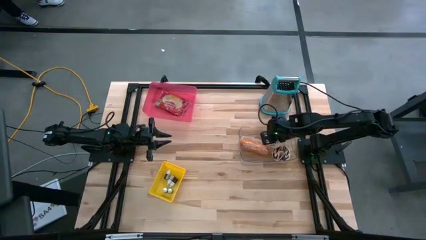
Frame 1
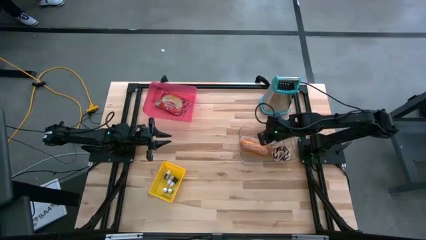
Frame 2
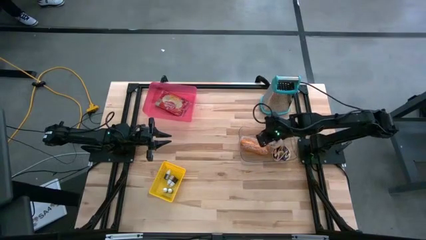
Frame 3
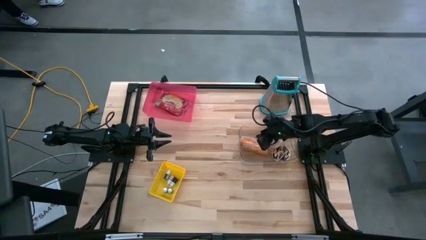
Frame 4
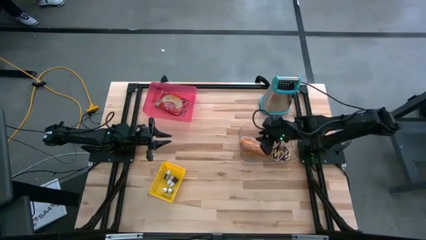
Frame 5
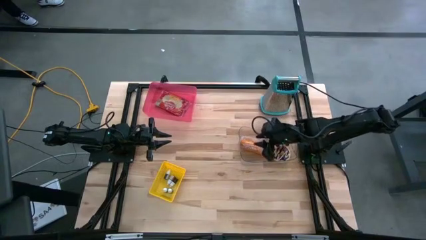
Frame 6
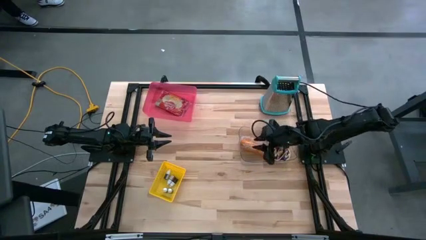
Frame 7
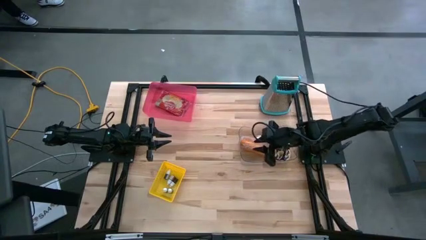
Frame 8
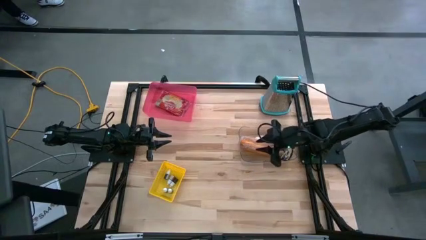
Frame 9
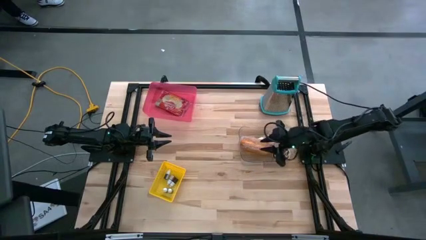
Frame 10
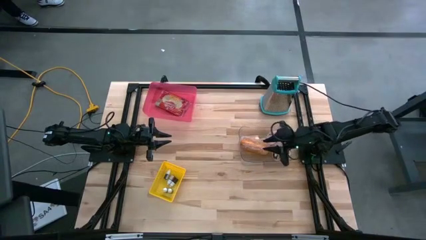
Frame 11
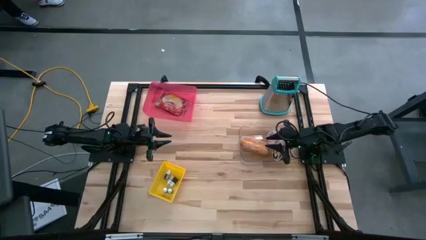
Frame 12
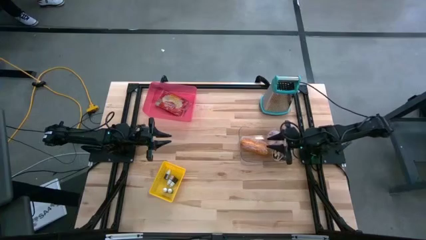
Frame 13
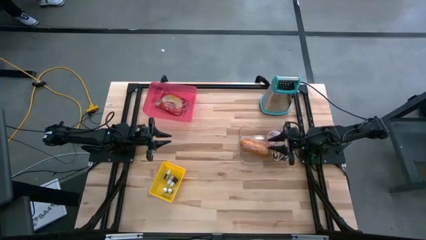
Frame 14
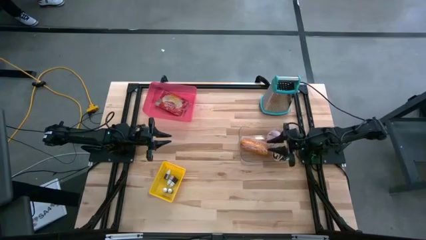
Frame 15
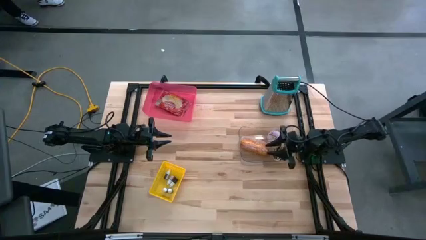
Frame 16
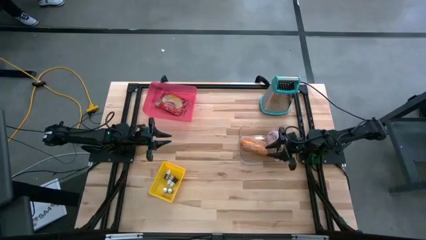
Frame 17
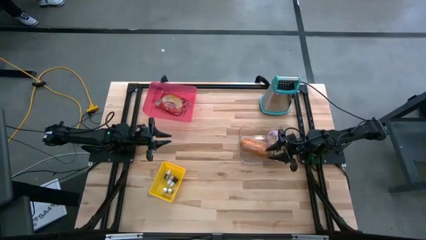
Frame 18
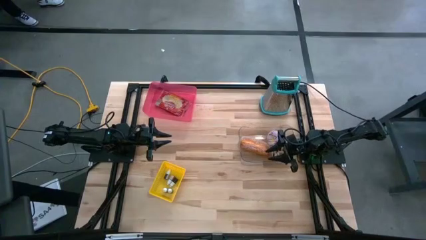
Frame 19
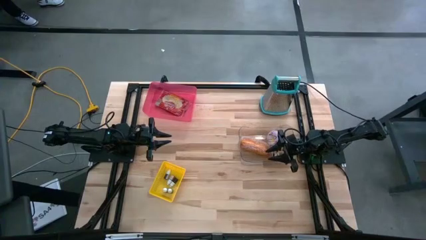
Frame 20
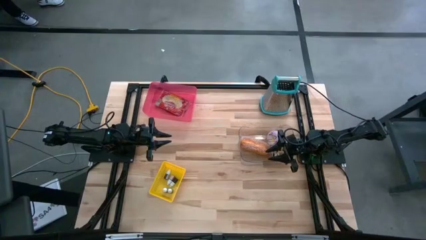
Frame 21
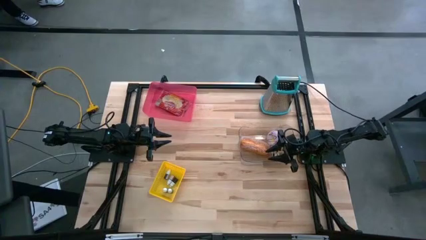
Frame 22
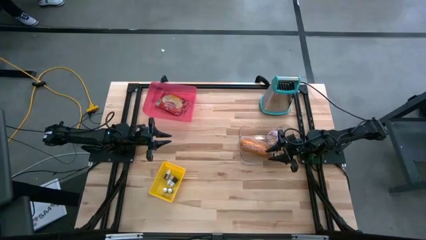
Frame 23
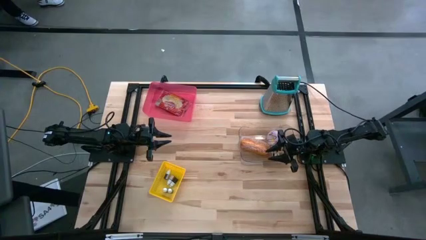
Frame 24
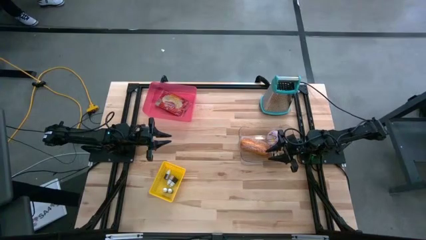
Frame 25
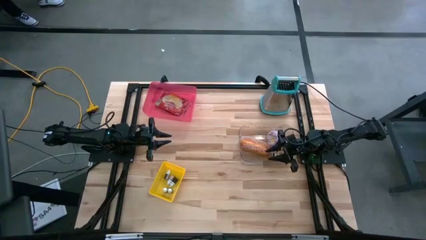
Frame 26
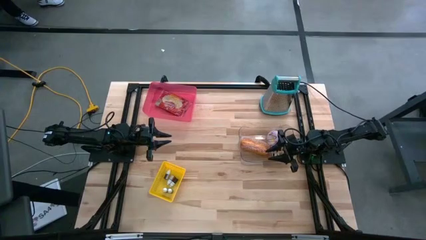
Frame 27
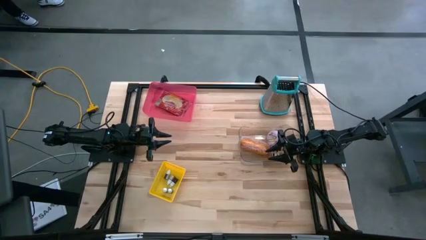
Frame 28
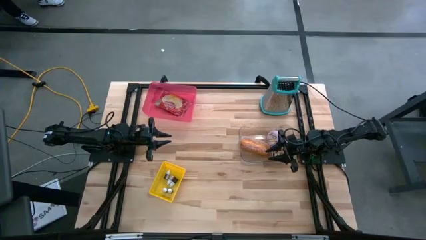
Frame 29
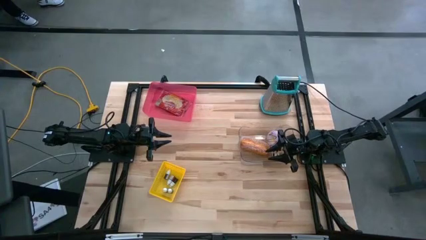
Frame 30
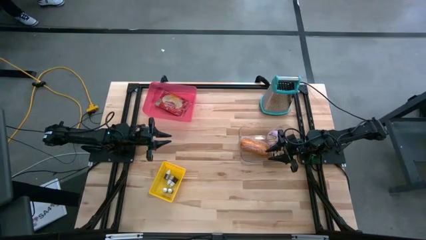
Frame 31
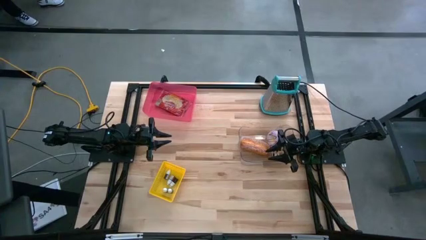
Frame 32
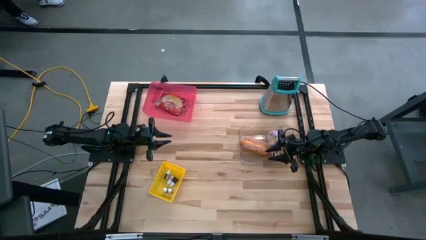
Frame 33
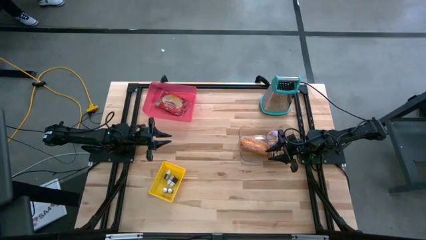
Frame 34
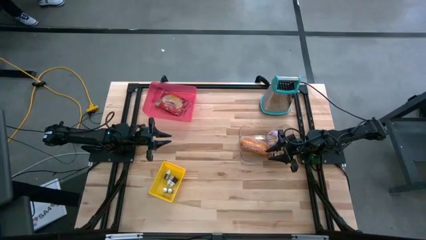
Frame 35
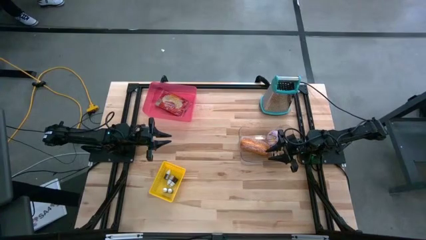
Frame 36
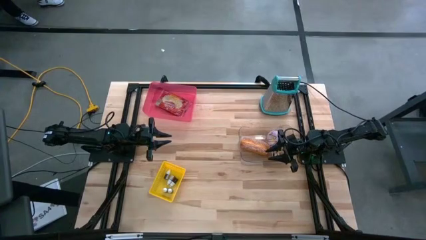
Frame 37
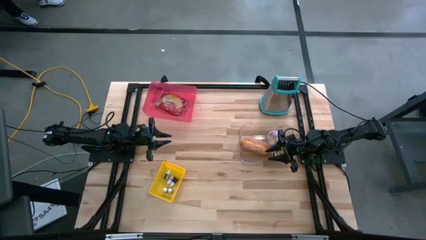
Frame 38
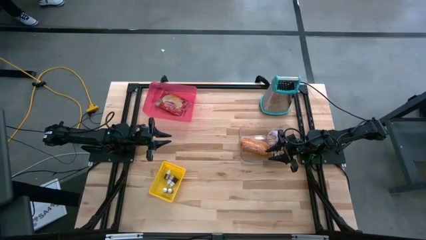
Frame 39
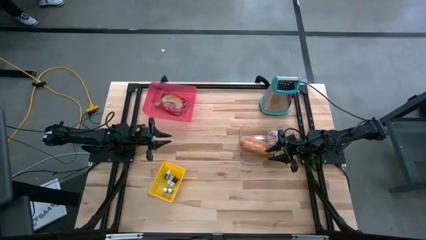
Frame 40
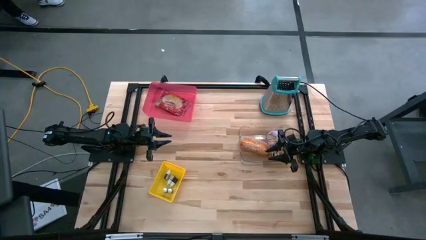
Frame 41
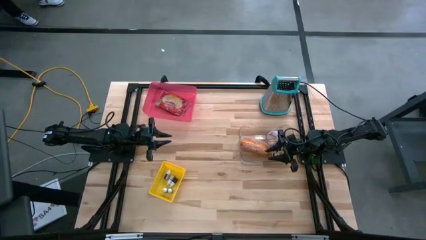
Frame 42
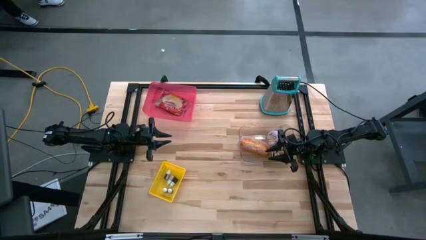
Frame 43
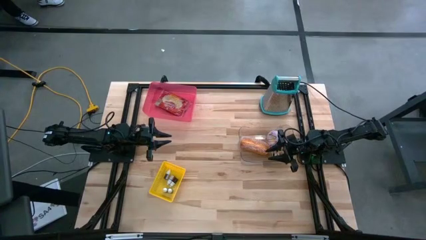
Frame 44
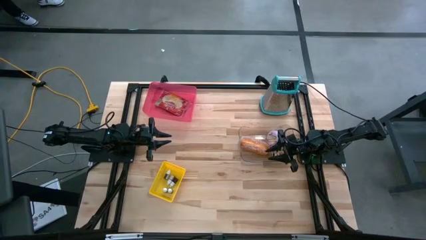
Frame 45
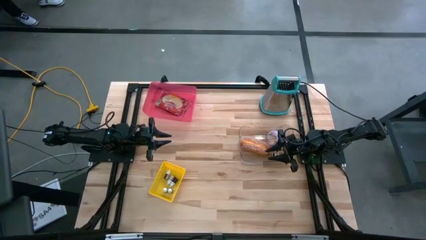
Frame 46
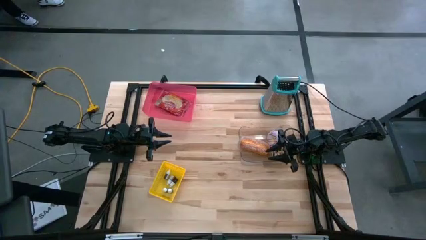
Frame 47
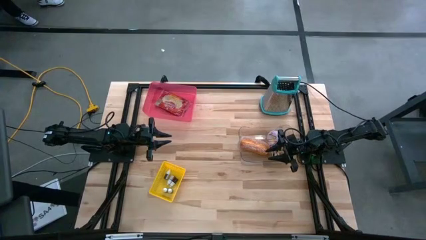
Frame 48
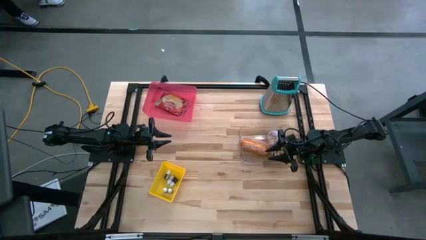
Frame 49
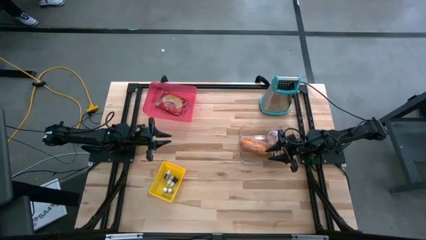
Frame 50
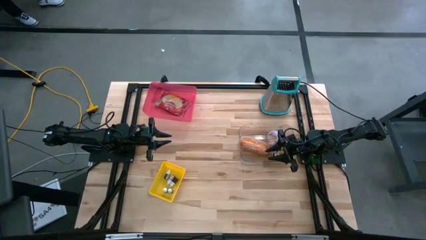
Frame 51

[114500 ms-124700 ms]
Return to Home Position
